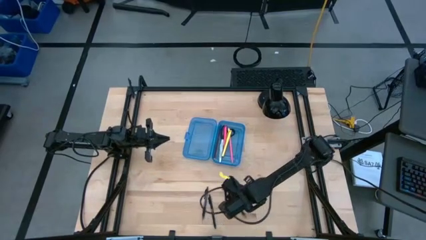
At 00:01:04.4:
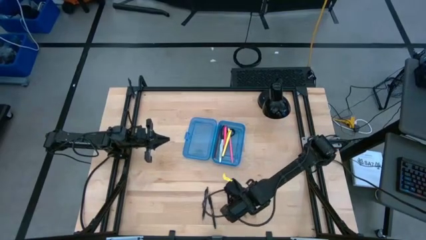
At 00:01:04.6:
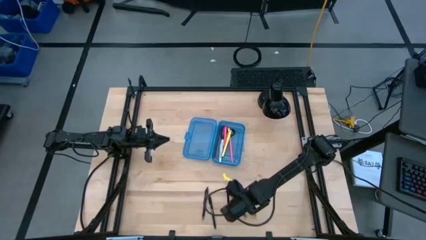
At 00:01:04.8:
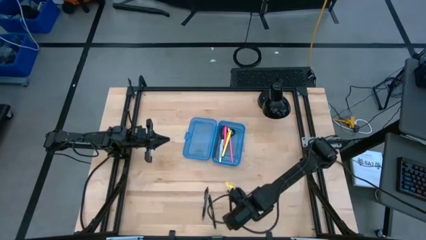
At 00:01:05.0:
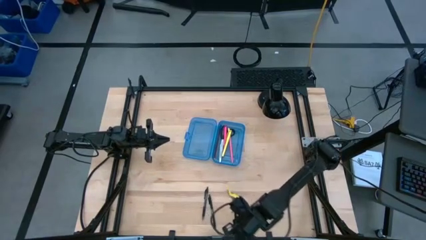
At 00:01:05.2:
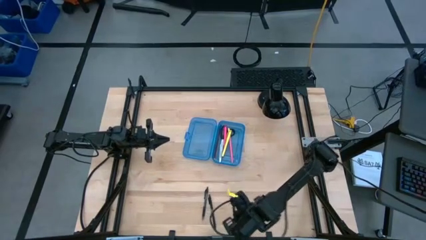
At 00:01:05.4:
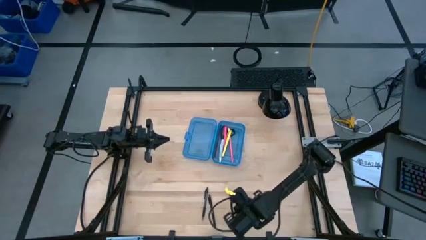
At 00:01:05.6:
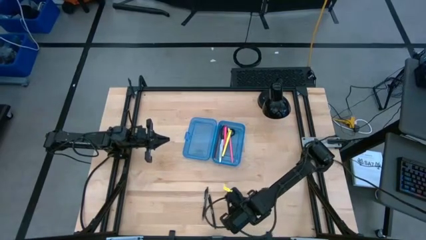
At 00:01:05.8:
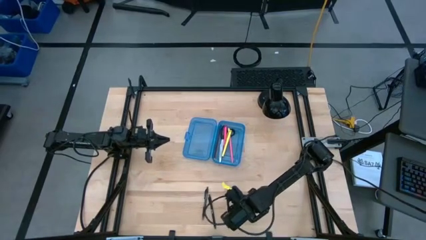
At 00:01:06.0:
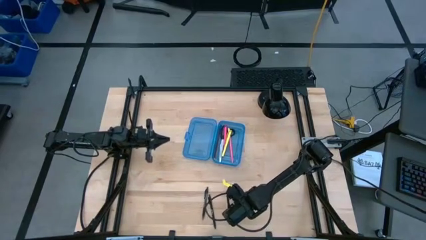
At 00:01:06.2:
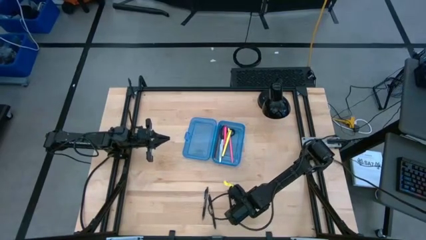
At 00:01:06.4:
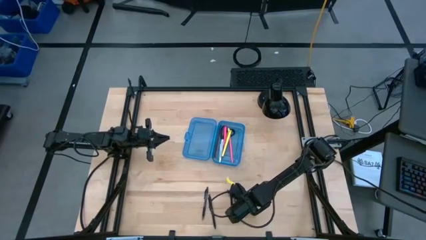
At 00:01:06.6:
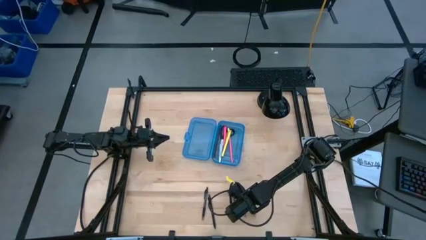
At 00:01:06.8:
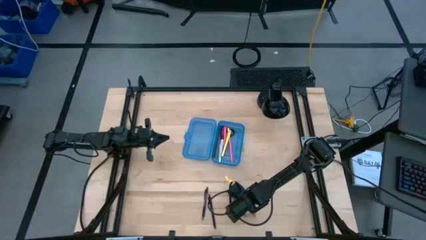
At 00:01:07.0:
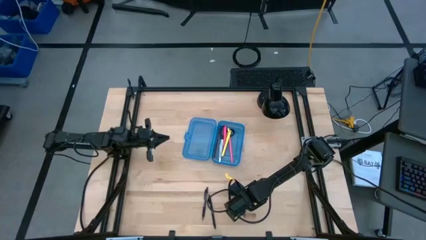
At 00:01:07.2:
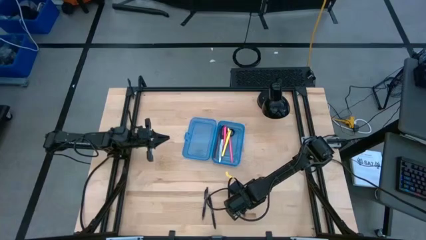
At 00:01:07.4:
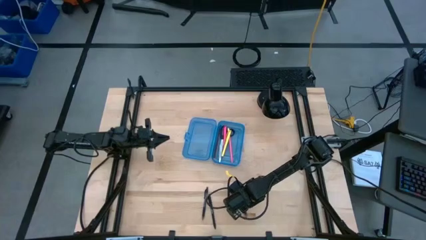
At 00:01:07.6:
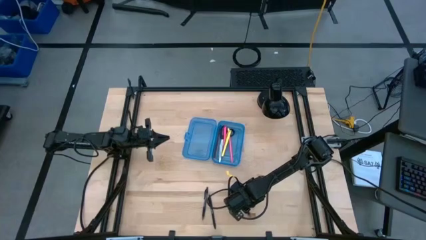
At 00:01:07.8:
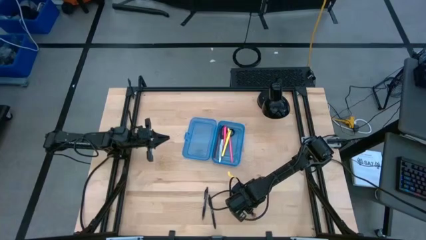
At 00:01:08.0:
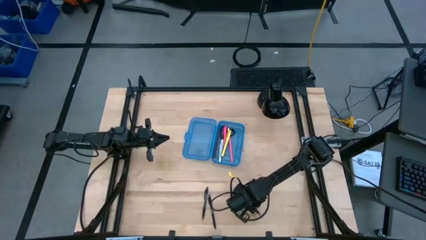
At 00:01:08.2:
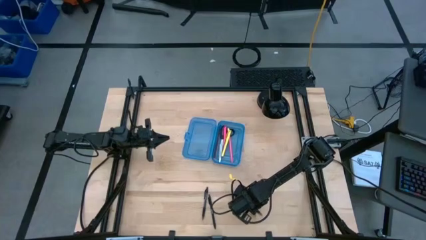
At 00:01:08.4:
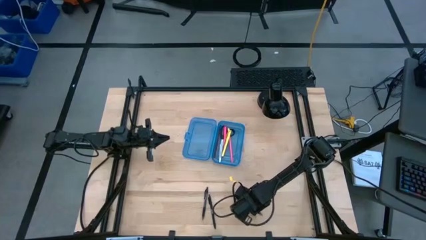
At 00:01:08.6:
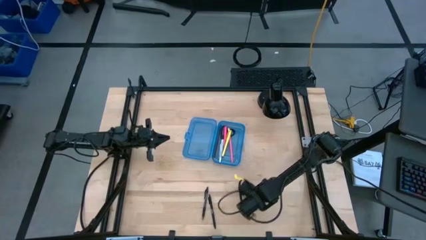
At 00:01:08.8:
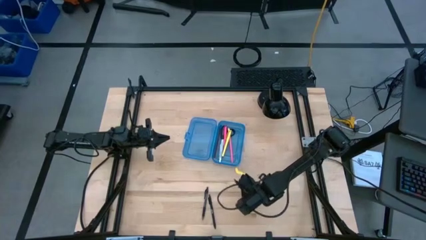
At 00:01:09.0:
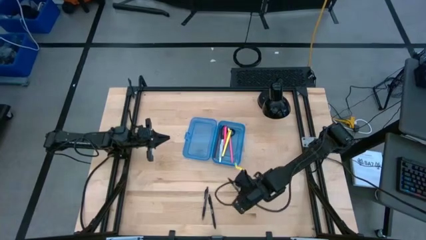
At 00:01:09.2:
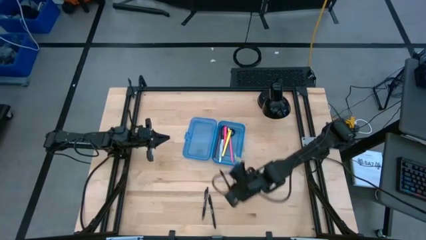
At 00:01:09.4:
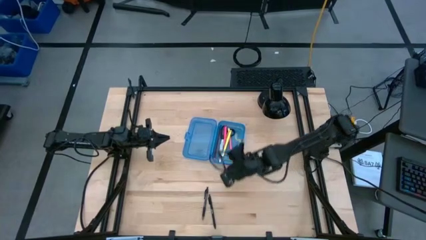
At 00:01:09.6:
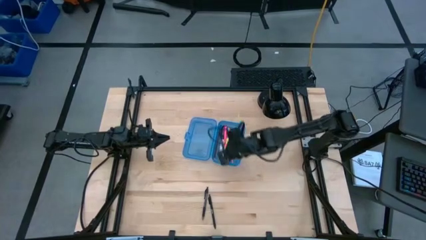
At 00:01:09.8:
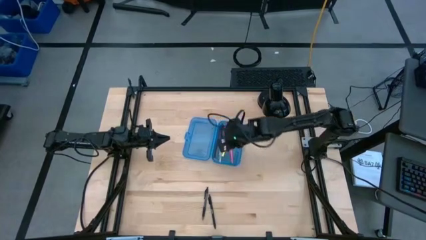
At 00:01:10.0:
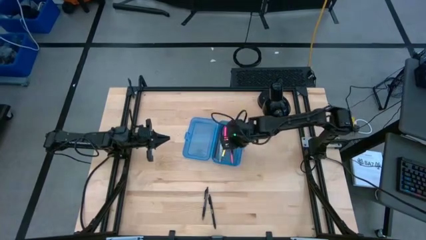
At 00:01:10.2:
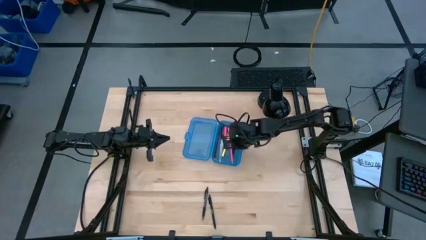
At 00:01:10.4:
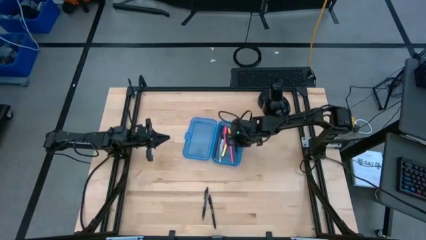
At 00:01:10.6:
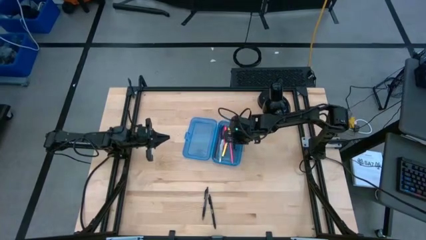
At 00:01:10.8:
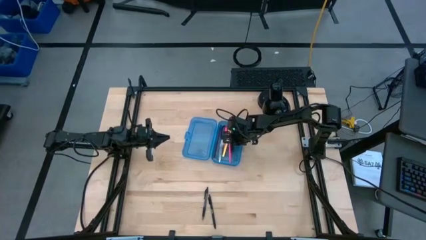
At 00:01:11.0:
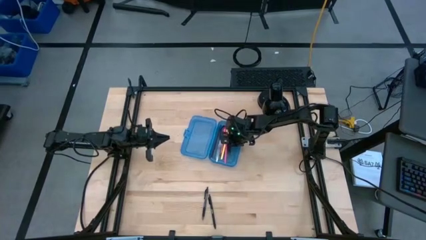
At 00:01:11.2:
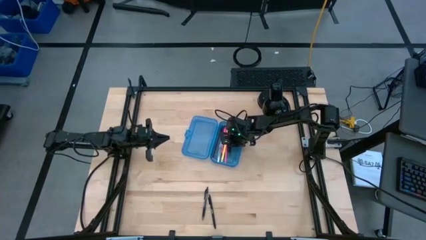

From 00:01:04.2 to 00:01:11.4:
Task: Pick & place school supplies into a supply box
Put the right transparent black pen into the supply box

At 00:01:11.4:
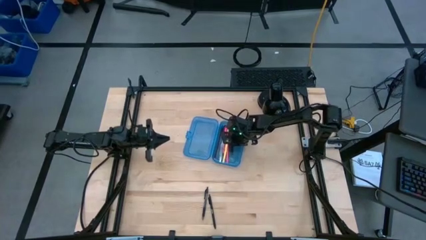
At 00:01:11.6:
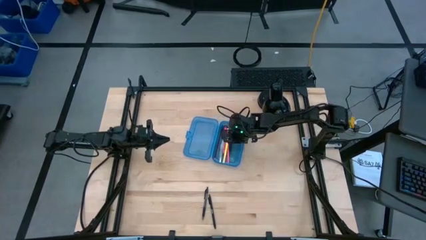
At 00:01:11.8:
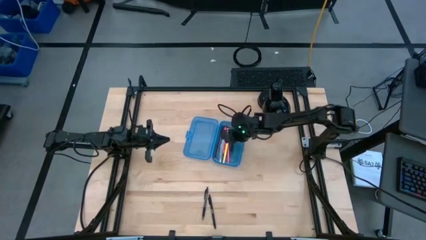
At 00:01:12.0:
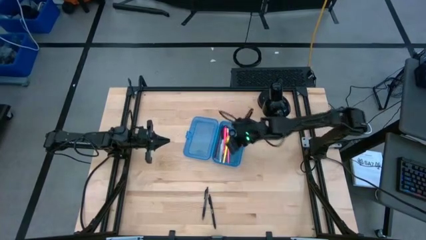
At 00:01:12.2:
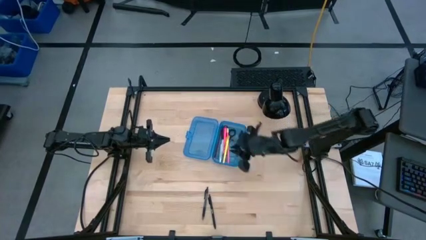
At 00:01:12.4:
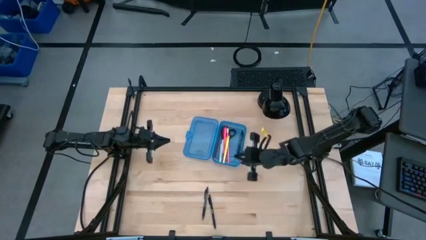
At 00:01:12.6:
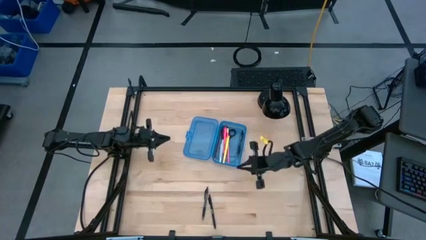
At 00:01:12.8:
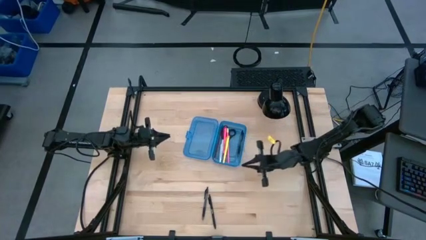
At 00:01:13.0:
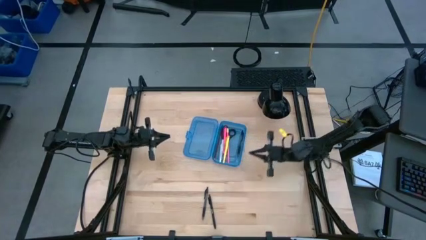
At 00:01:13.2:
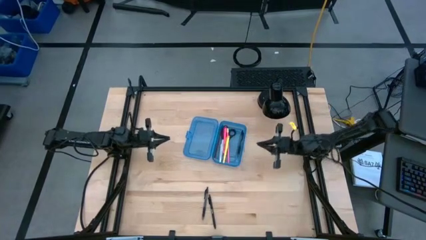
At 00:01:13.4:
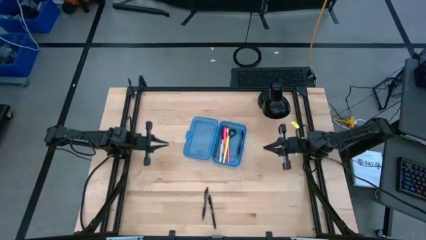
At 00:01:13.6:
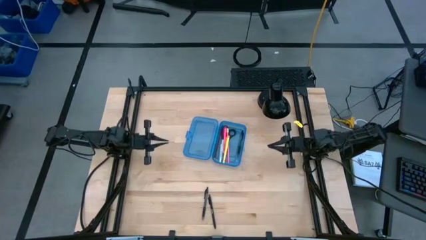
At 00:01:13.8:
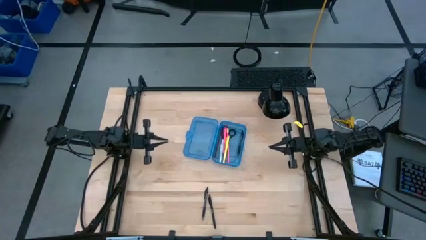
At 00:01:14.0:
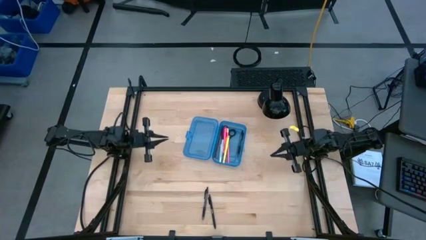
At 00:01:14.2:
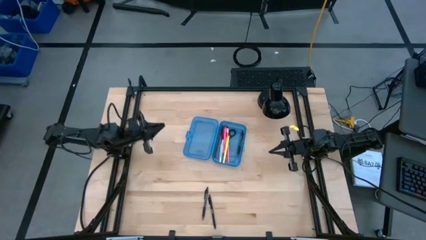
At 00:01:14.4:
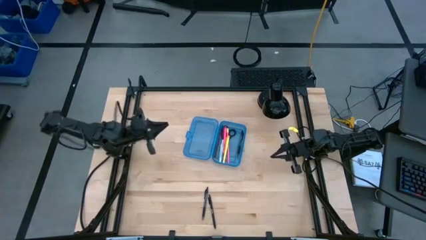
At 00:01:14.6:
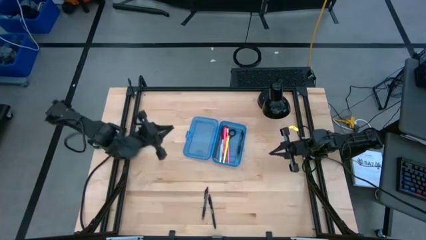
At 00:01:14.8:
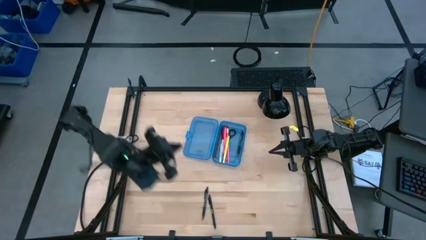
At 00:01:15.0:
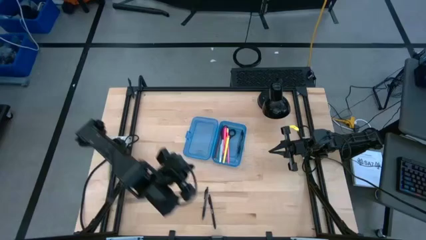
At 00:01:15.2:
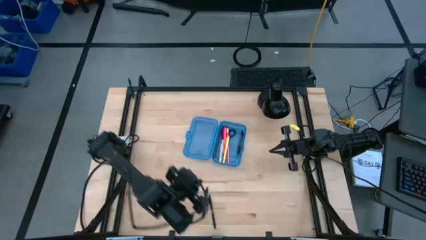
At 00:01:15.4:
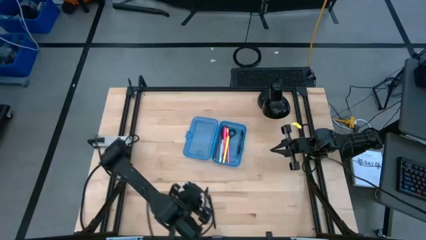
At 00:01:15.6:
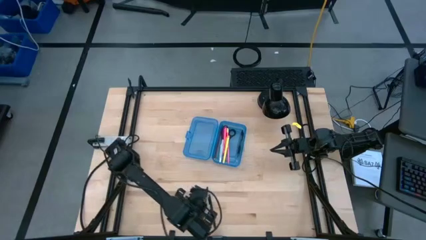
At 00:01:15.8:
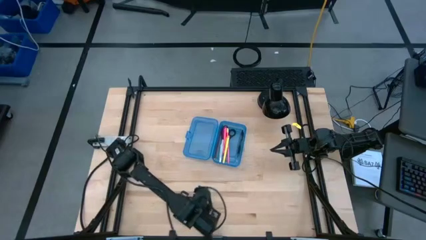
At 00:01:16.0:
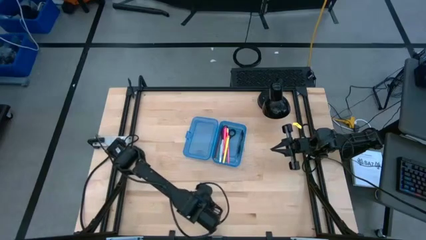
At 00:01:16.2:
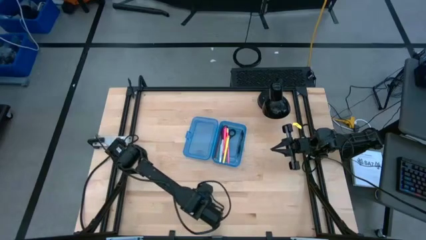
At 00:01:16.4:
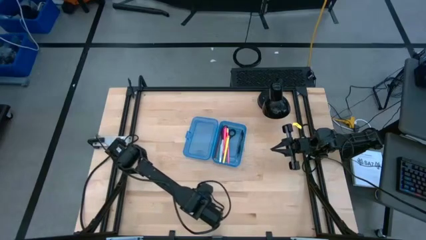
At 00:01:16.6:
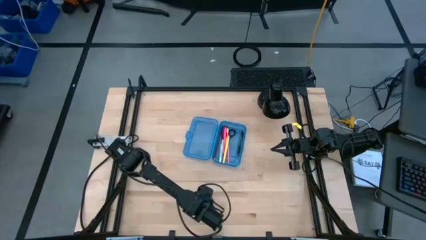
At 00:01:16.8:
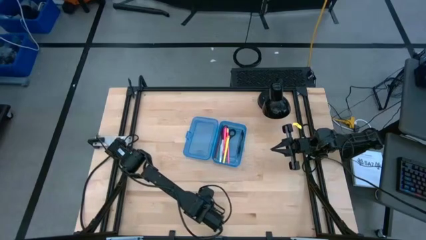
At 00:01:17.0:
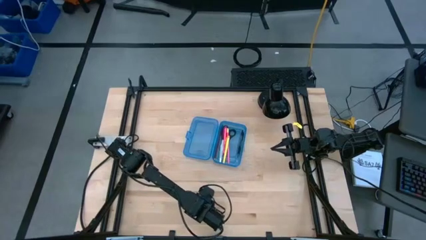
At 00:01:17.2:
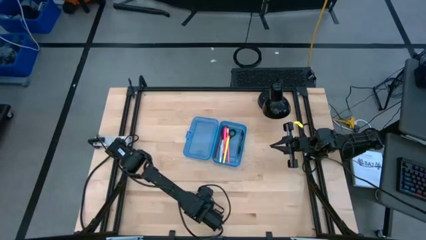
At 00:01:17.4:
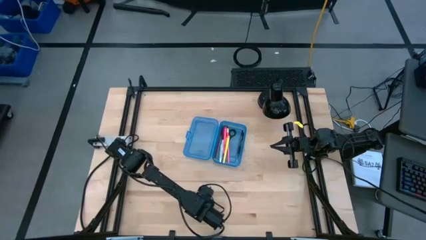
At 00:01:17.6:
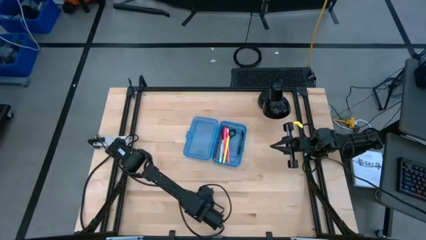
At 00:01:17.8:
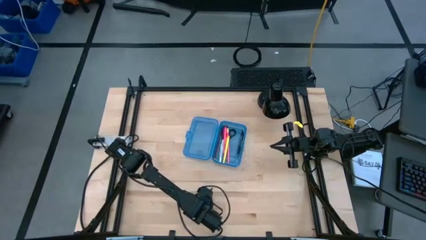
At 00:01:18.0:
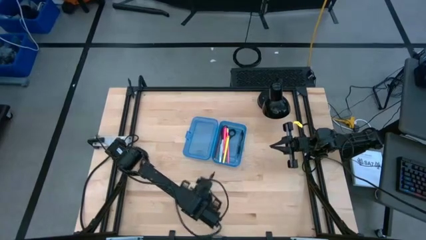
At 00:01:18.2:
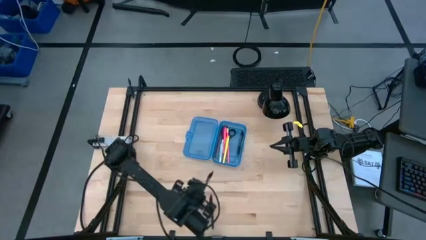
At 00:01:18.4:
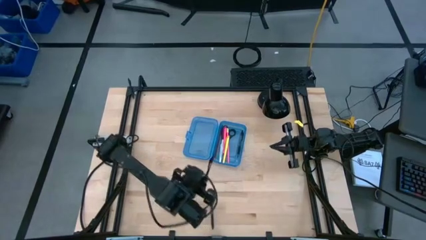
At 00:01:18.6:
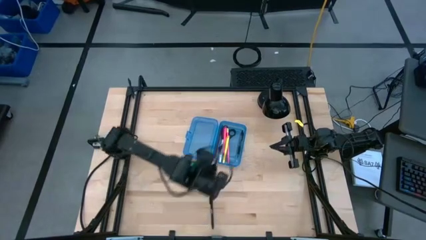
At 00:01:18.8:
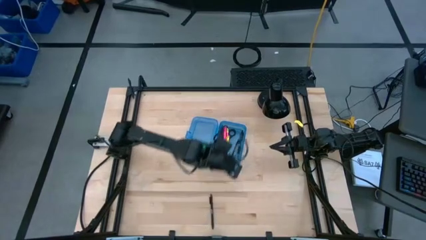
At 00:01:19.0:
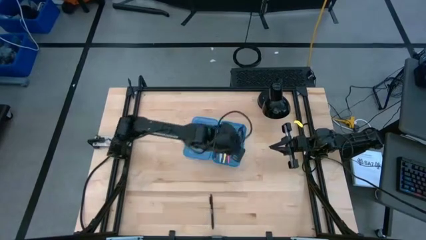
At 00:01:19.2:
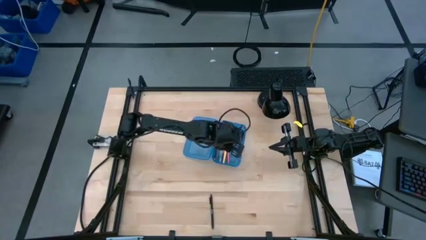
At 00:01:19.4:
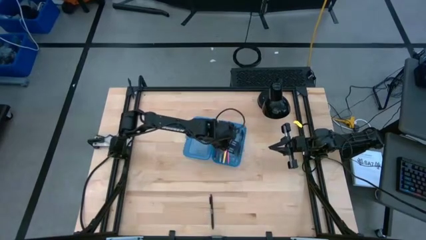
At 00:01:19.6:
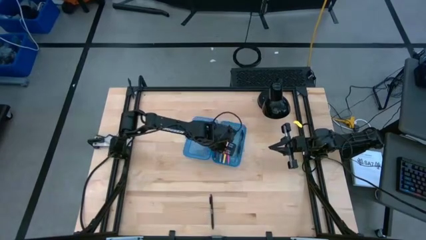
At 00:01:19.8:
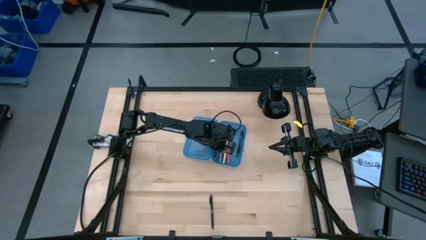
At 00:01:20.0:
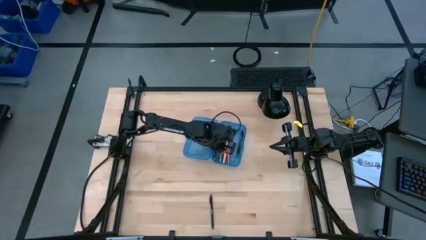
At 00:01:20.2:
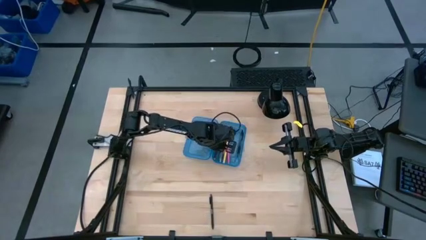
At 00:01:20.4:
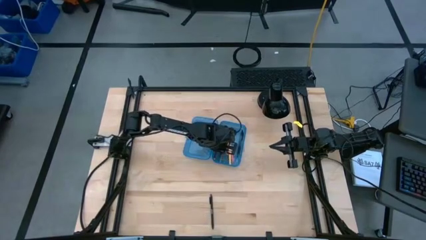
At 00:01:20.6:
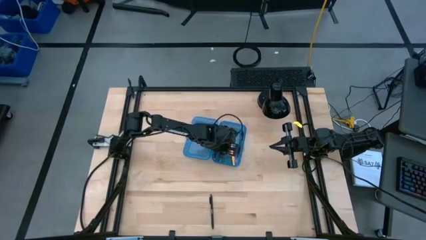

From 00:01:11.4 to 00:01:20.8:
Put the transparent black pen into the supply box
